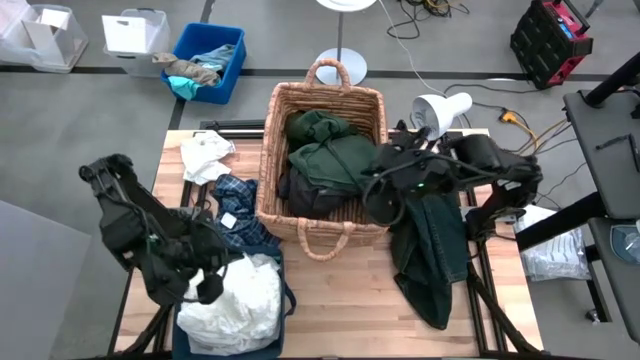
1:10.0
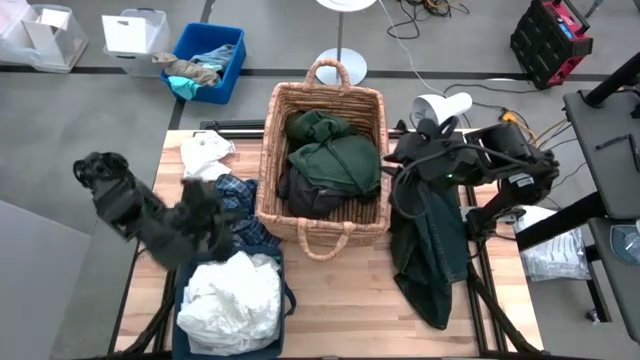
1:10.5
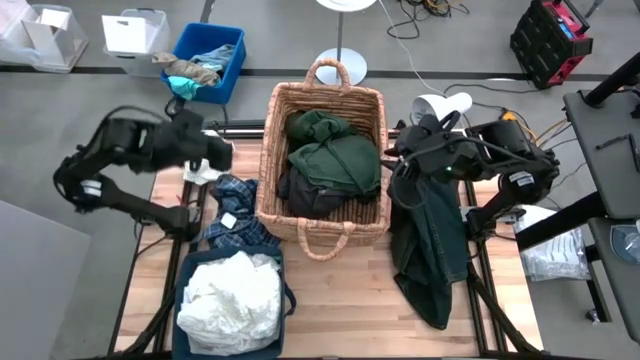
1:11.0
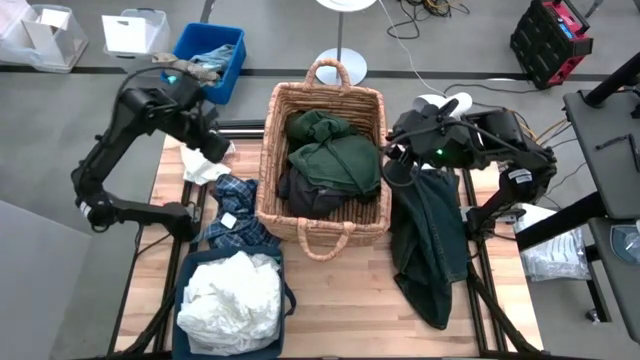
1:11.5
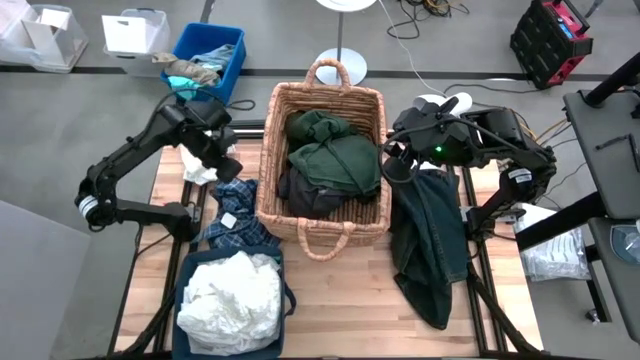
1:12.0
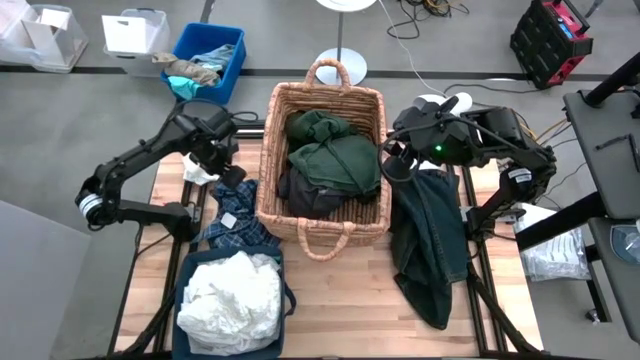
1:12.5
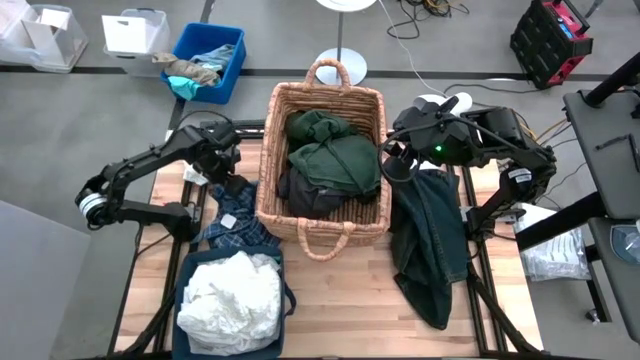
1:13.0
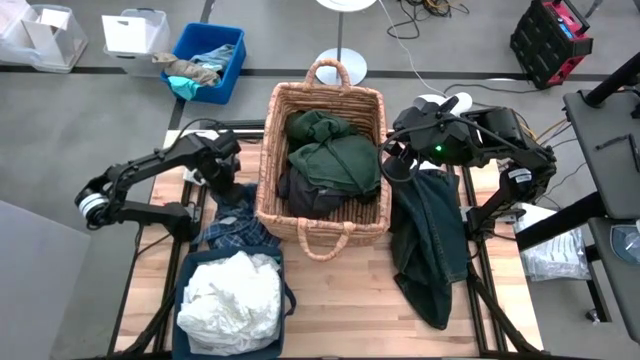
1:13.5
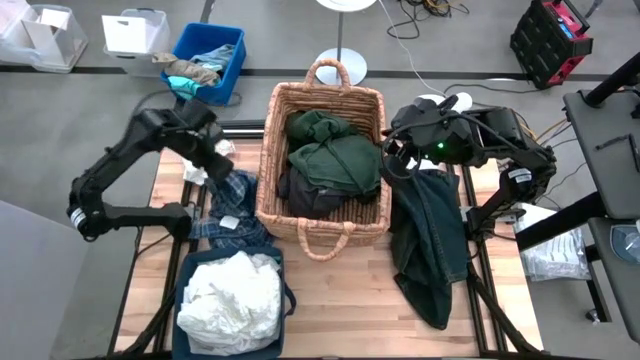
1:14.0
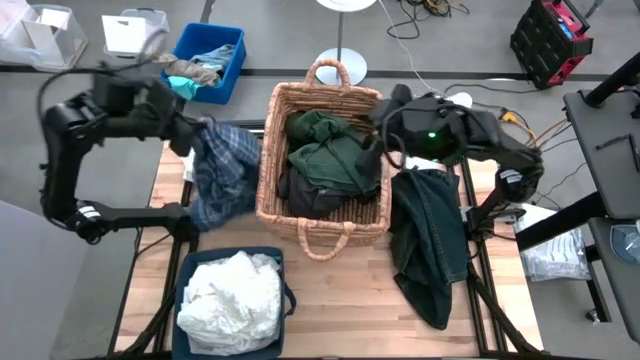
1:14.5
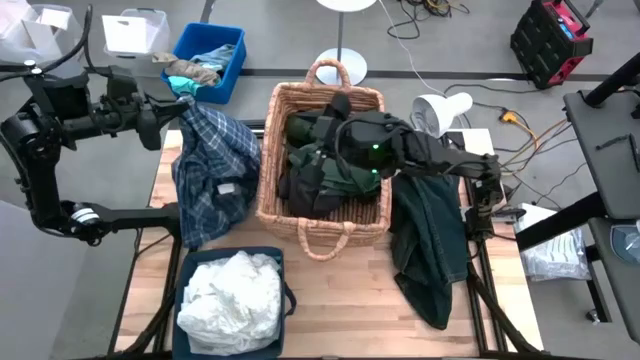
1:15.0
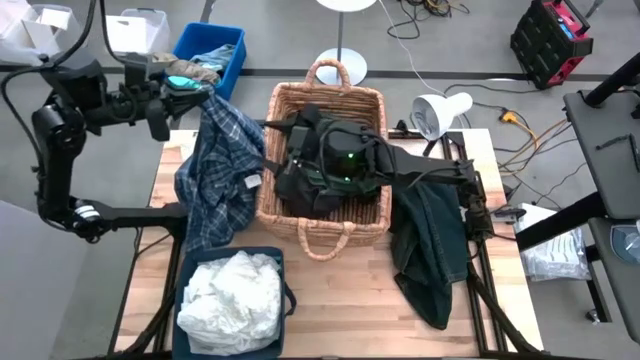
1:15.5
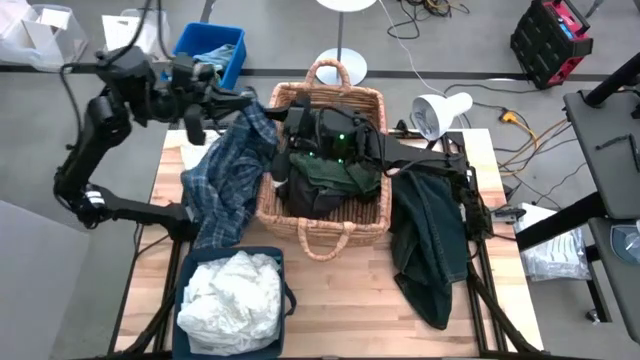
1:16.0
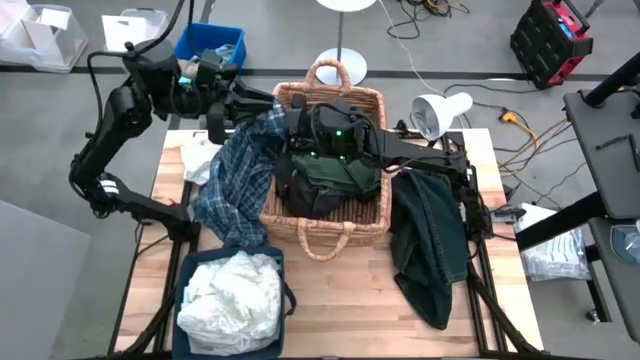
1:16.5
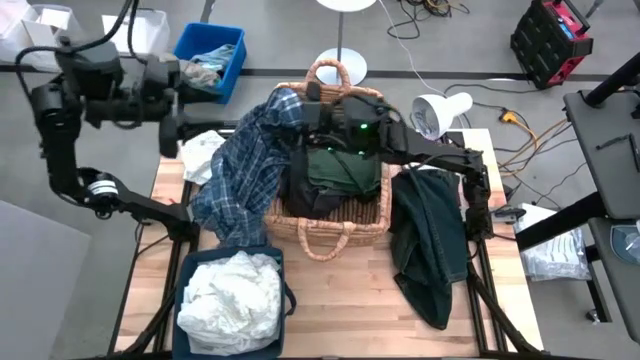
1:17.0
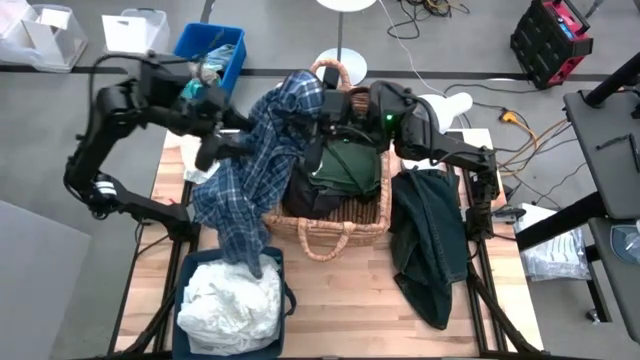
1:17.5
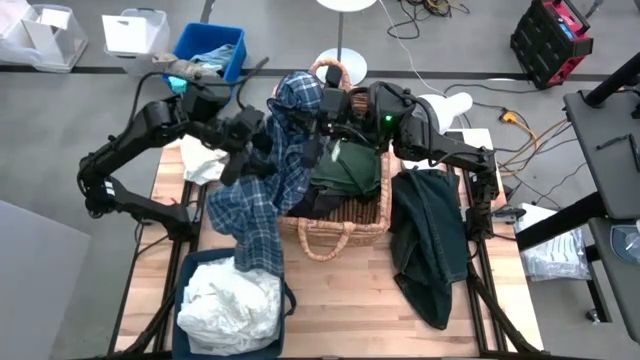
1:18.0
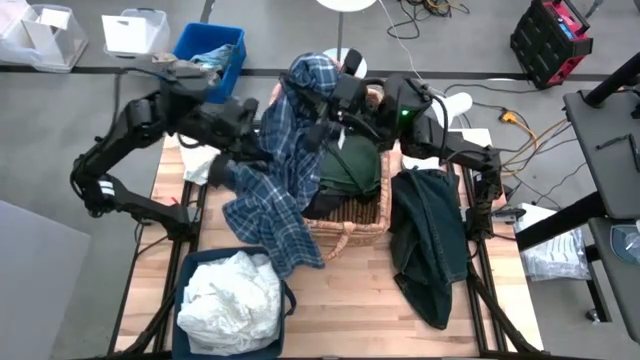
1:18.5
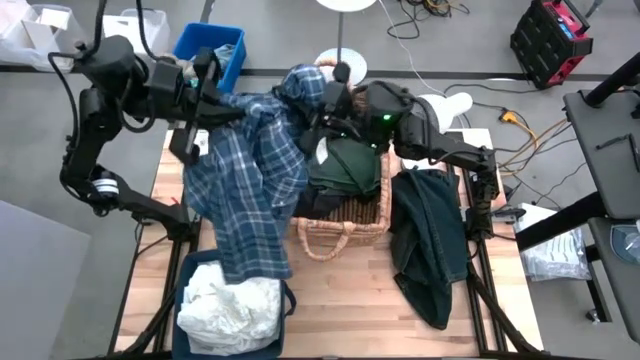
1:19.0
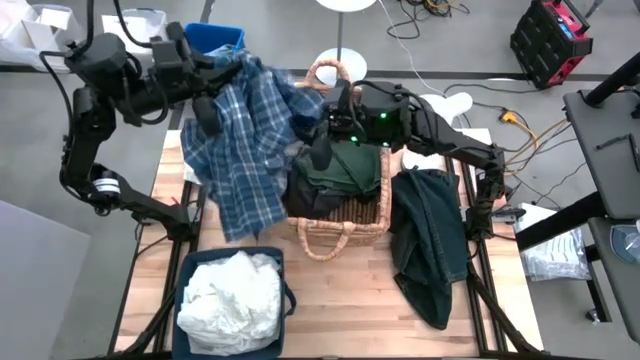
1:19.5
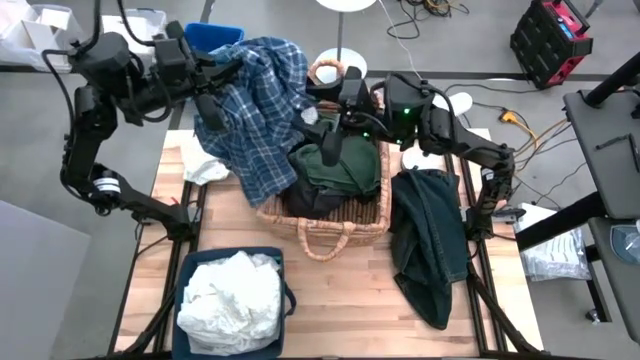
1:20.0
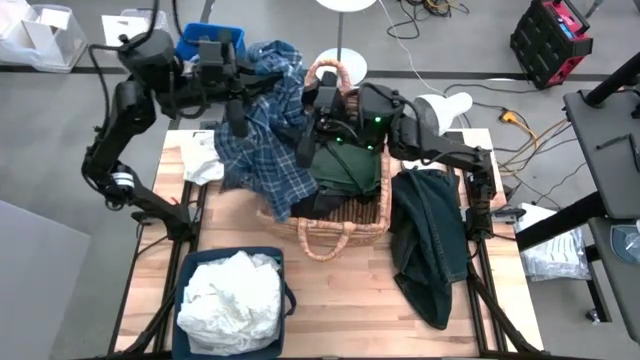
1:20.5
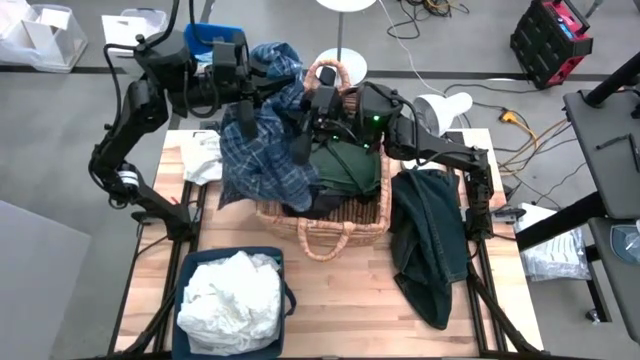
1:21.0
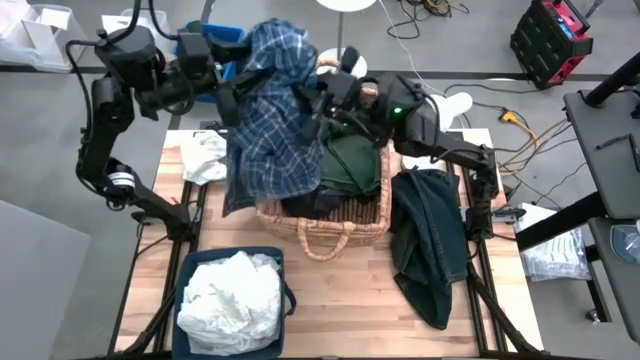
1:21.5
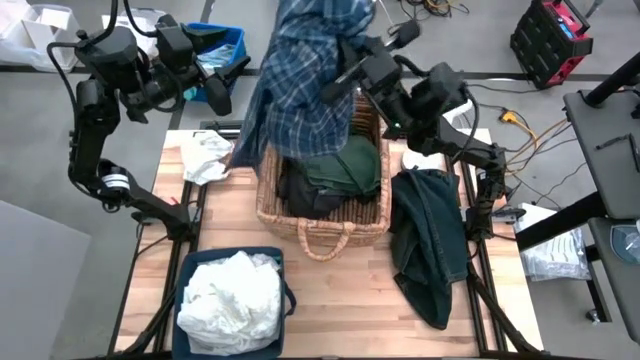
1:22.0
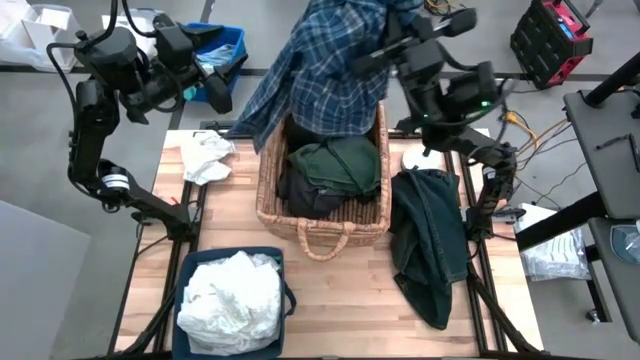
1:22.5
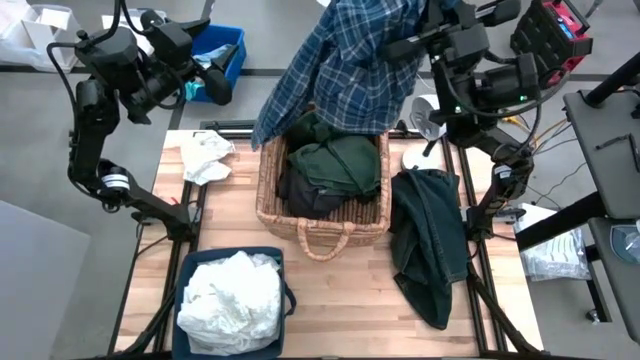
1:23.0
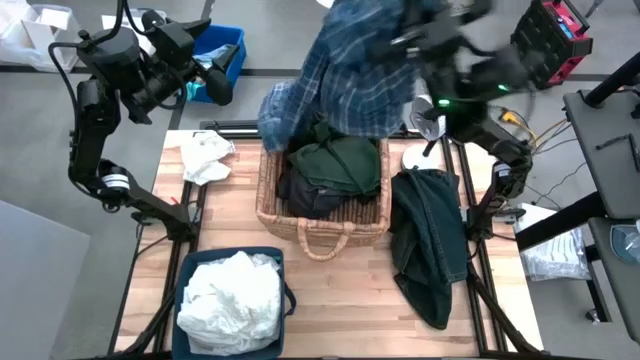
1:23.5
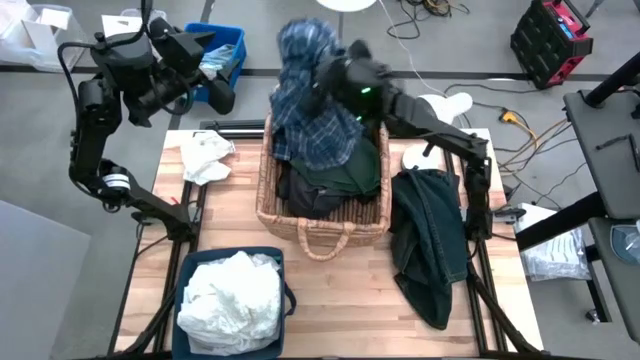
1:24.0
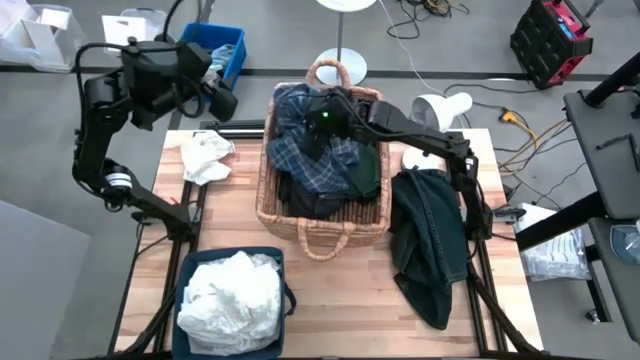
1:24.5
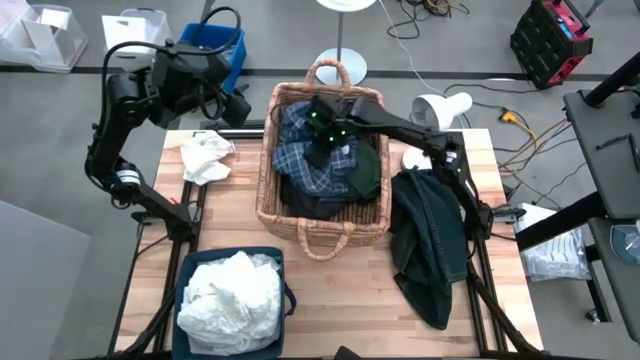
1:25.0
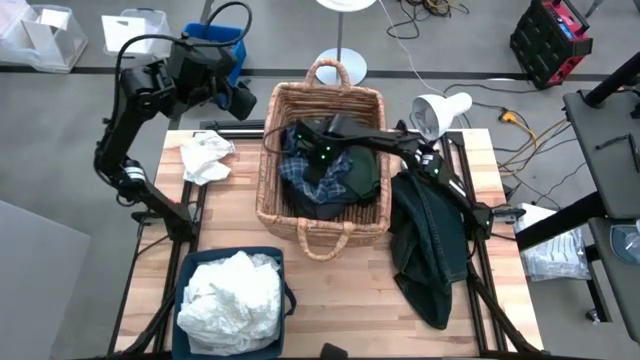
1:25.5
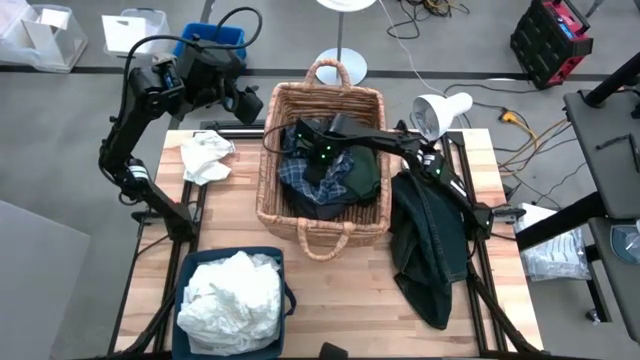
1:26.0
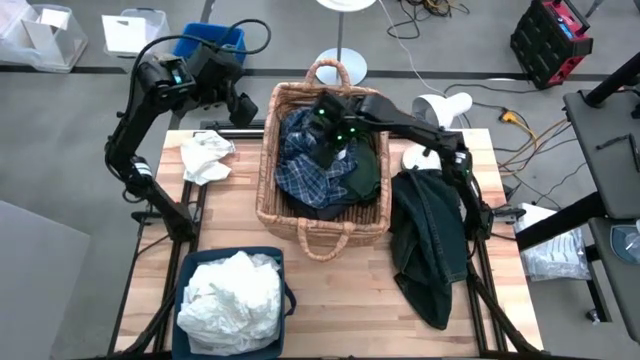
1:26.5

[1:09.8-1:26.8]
Task: Sort clothes
Put the blue checkered polo shirt into the brown basket

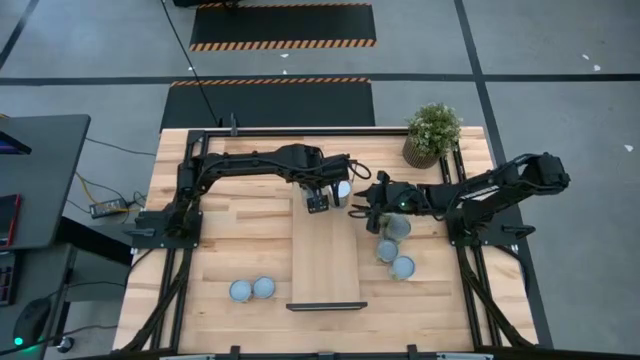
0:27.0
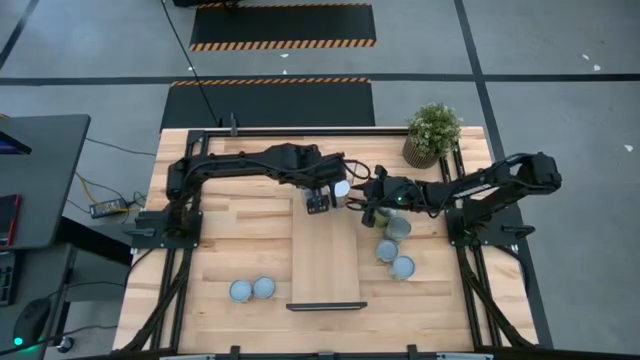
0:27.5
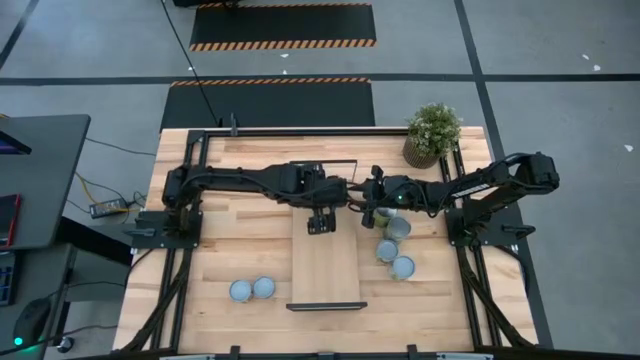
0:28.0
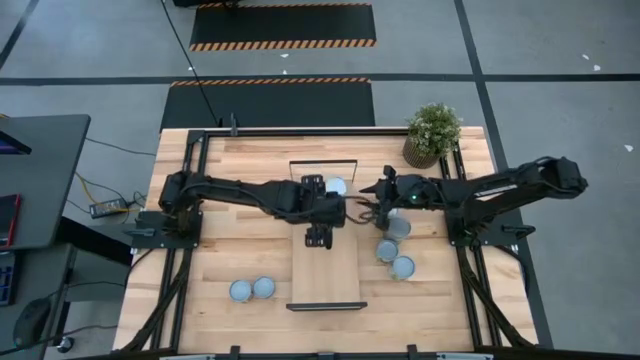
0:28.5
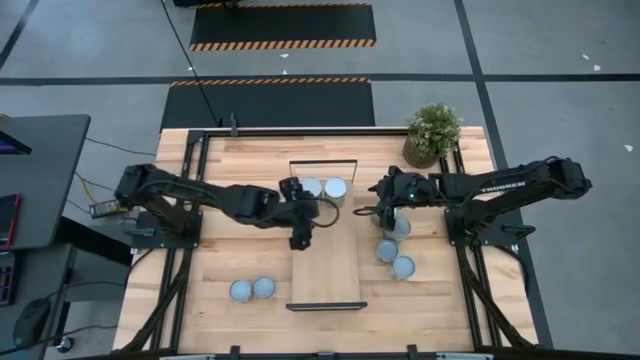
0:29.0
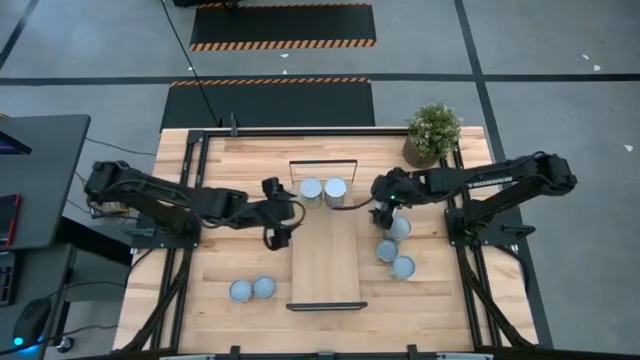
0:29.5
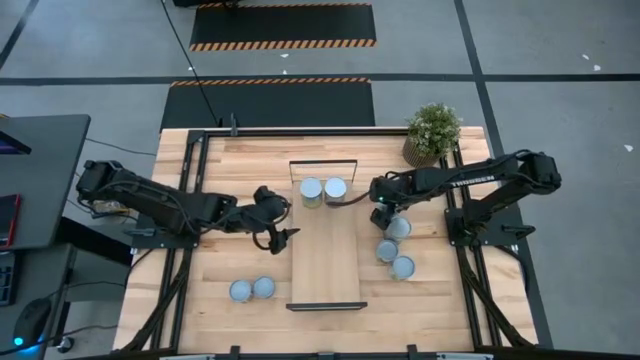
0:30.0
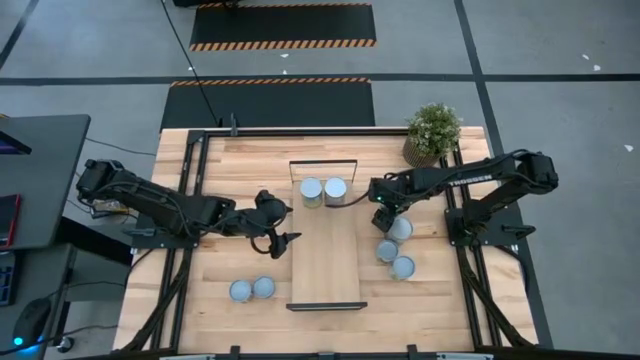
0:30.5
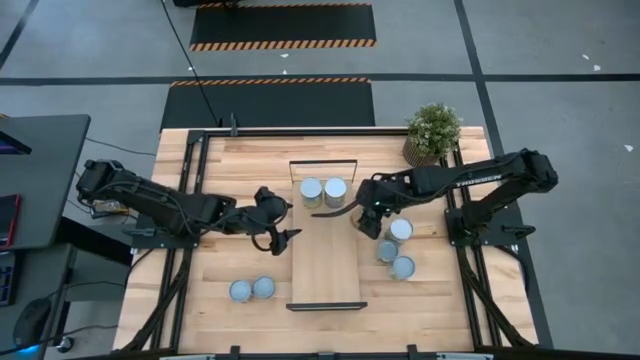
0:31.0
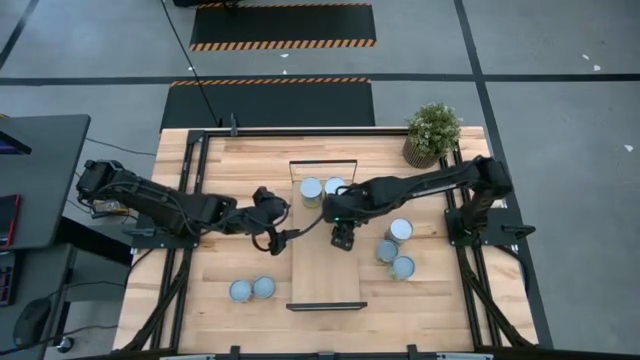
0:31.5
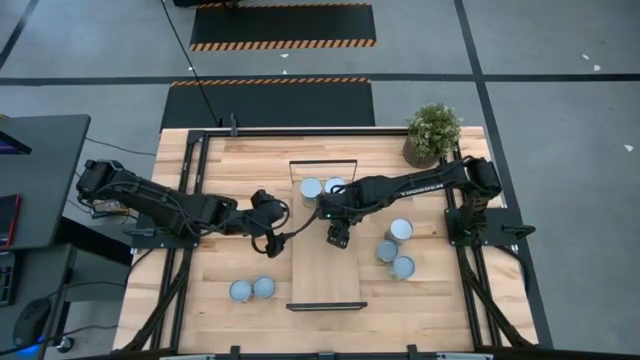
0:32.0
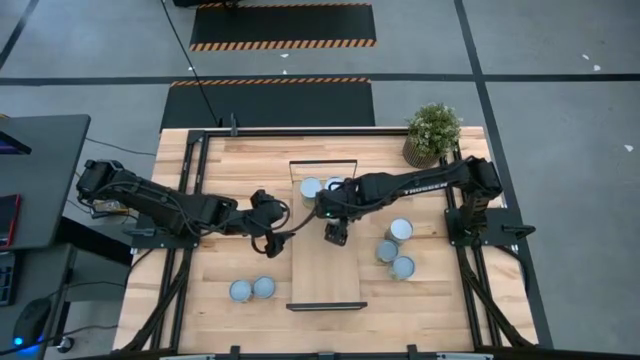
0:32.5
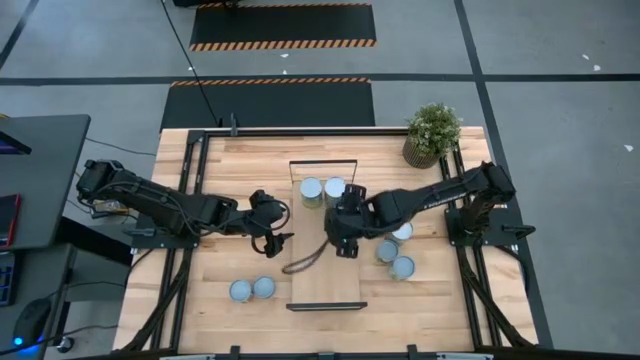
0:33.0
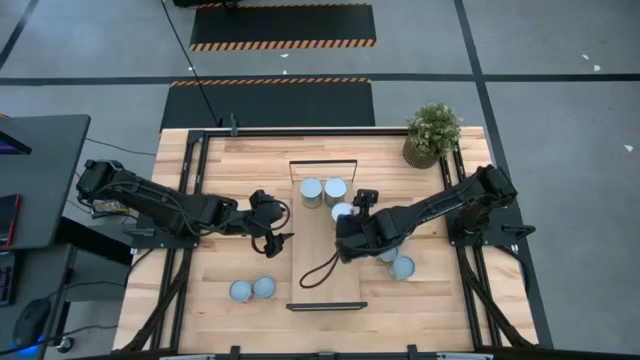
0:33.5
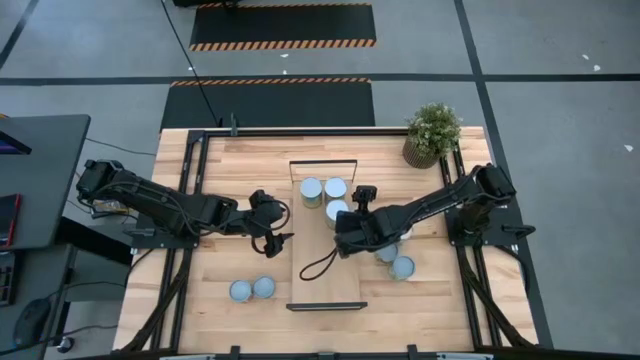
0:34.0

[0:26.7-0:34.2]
Task: Pick and place cans onto a shelf
Put the canned oranges on the shelf
